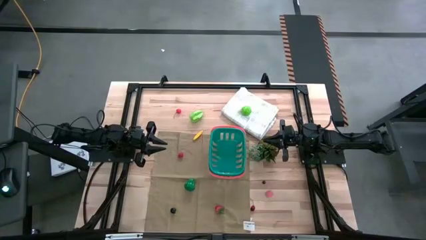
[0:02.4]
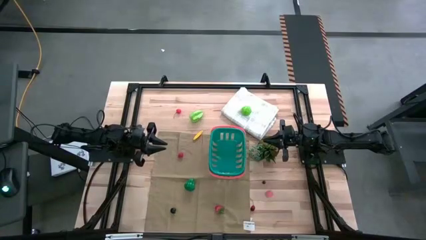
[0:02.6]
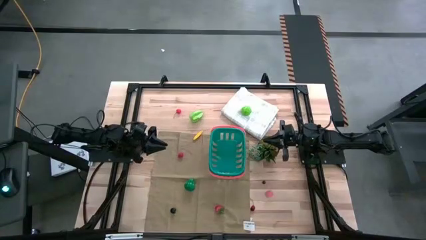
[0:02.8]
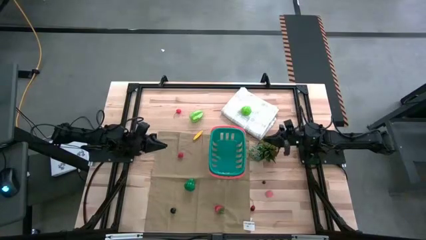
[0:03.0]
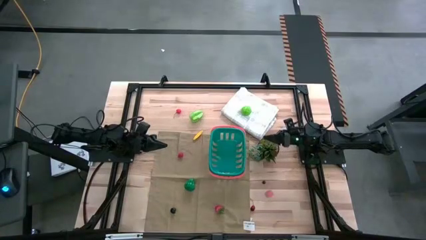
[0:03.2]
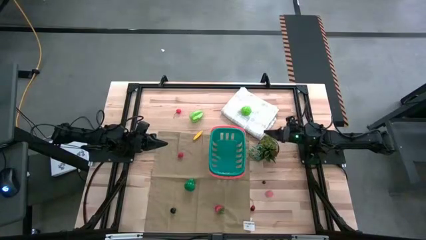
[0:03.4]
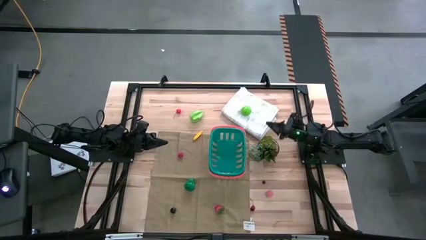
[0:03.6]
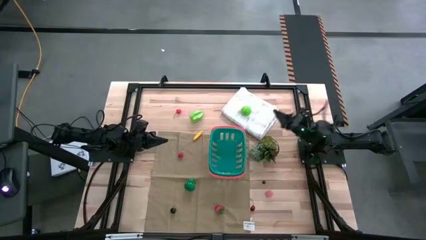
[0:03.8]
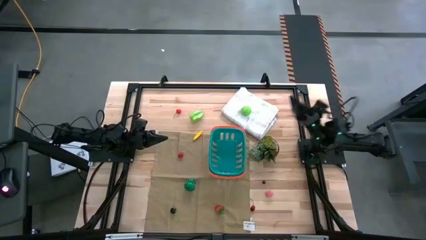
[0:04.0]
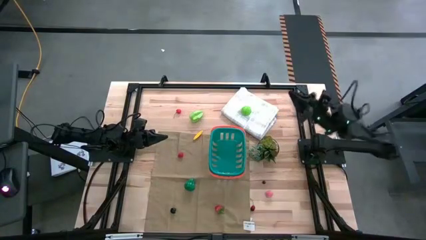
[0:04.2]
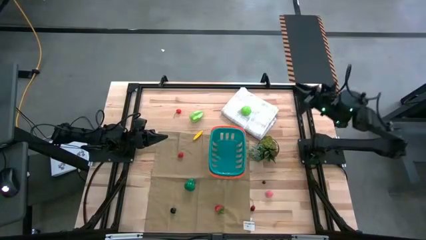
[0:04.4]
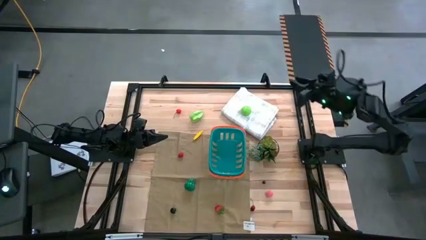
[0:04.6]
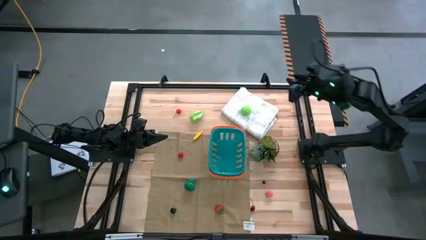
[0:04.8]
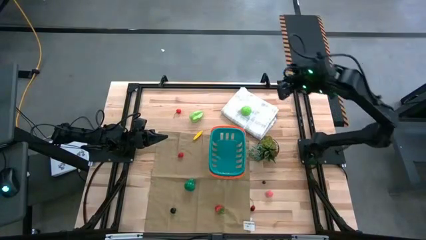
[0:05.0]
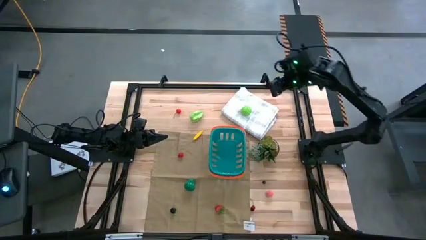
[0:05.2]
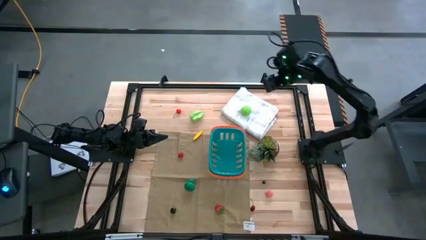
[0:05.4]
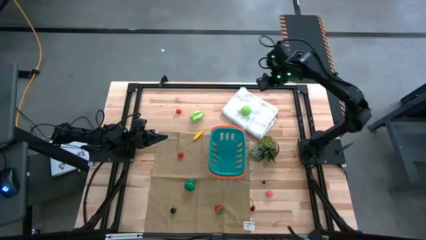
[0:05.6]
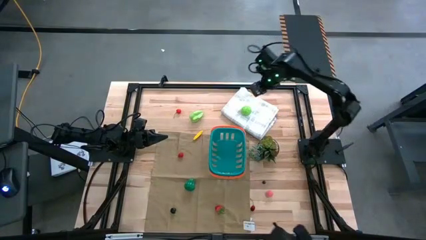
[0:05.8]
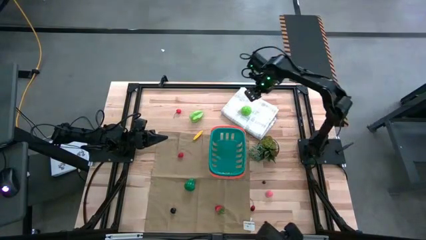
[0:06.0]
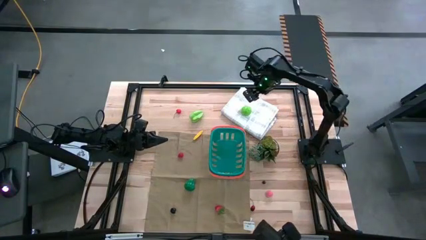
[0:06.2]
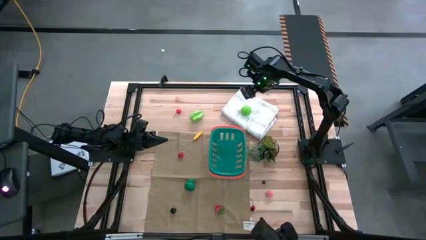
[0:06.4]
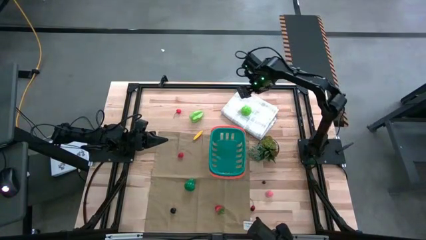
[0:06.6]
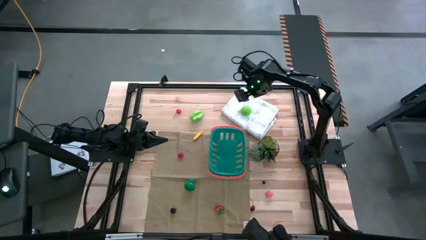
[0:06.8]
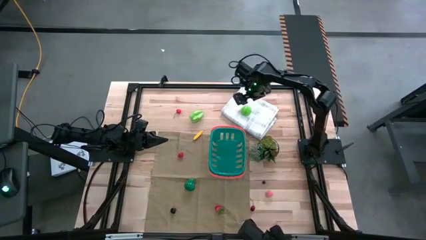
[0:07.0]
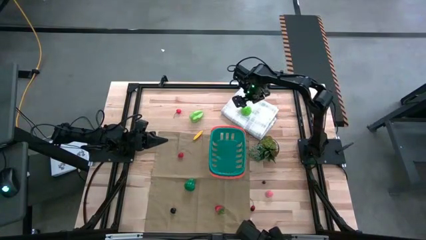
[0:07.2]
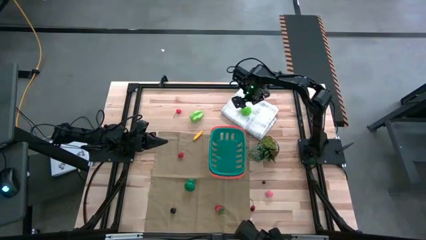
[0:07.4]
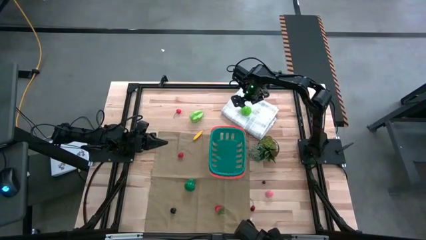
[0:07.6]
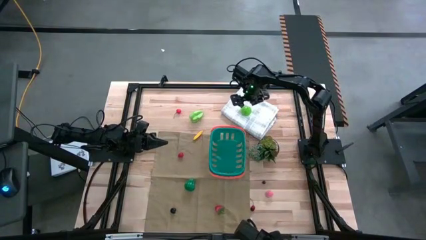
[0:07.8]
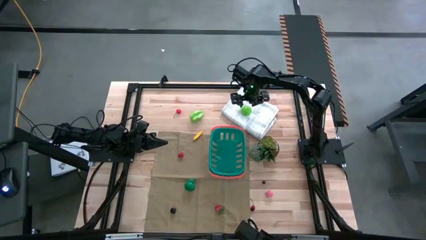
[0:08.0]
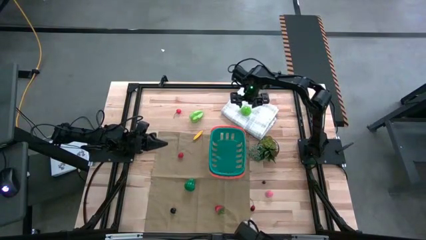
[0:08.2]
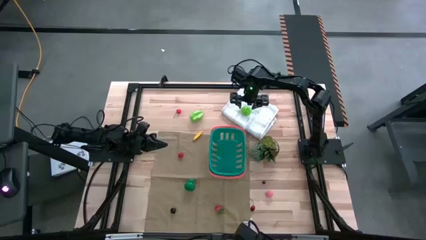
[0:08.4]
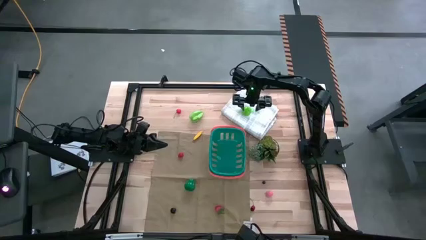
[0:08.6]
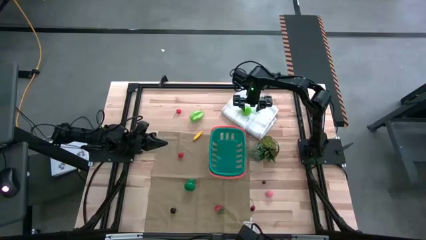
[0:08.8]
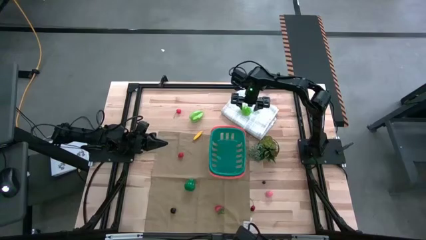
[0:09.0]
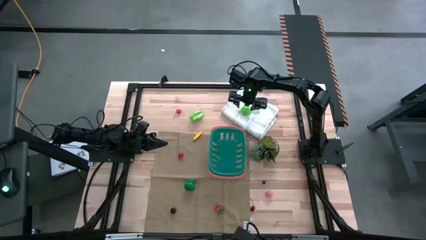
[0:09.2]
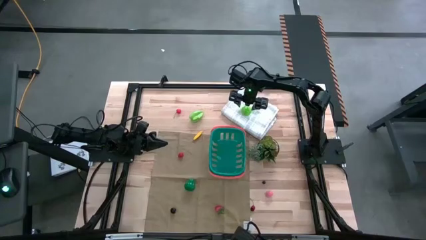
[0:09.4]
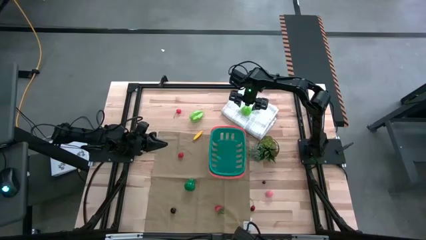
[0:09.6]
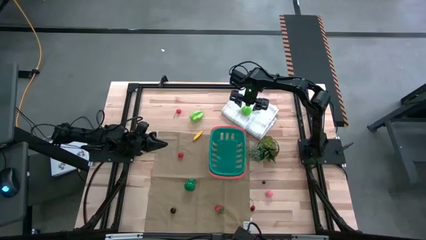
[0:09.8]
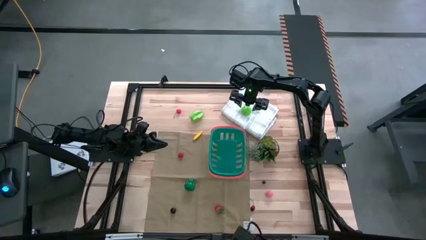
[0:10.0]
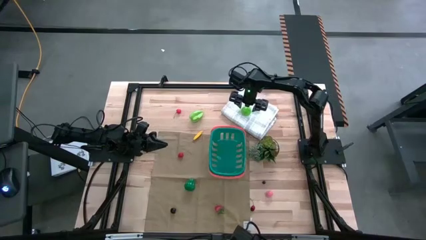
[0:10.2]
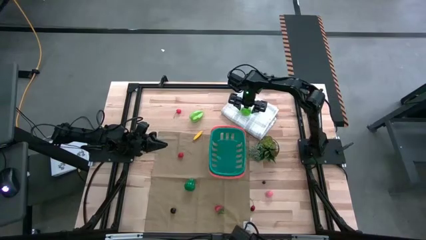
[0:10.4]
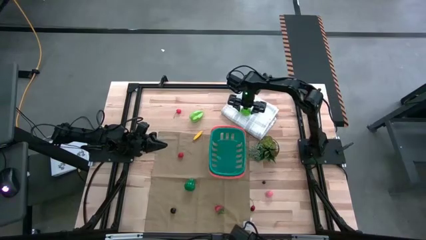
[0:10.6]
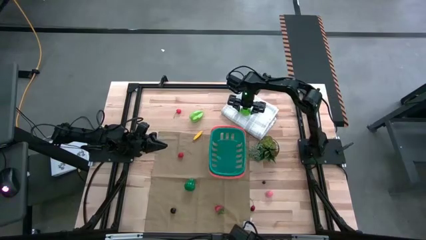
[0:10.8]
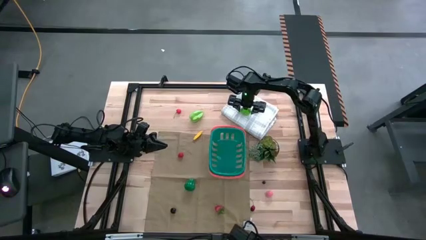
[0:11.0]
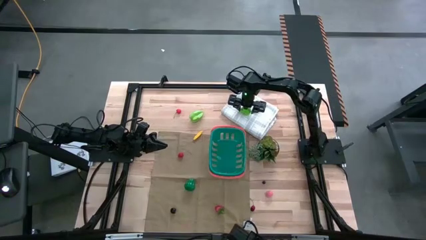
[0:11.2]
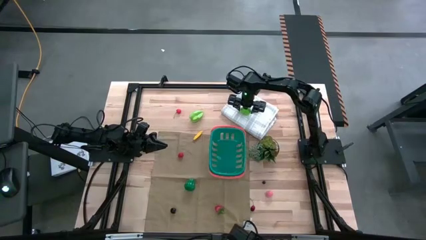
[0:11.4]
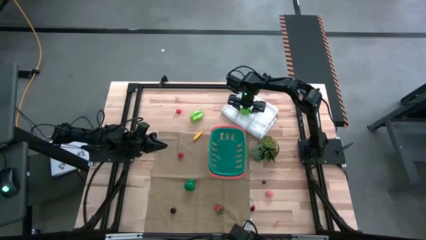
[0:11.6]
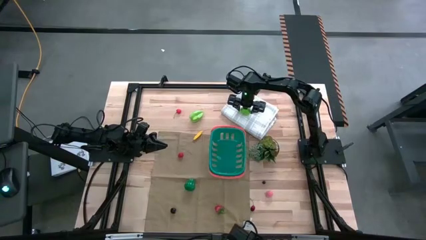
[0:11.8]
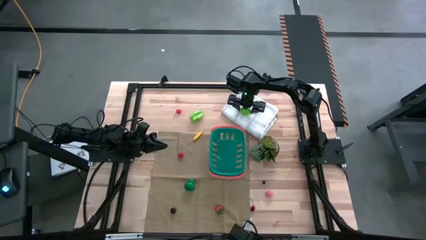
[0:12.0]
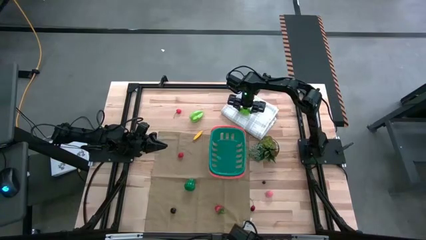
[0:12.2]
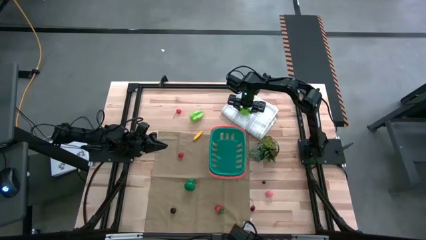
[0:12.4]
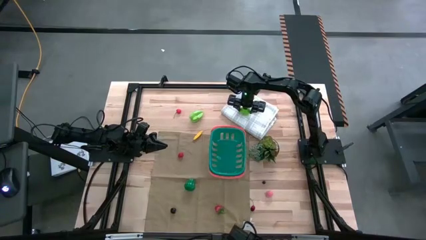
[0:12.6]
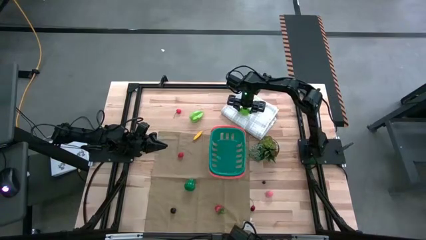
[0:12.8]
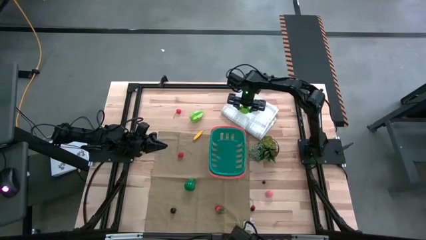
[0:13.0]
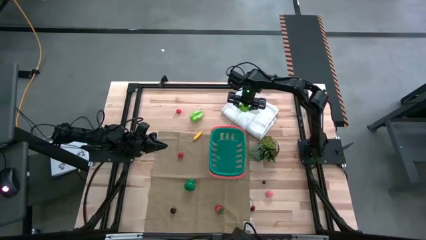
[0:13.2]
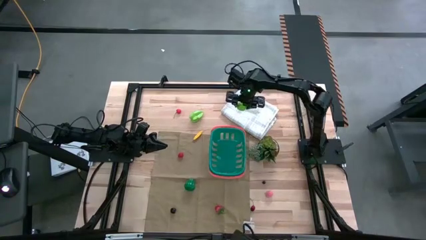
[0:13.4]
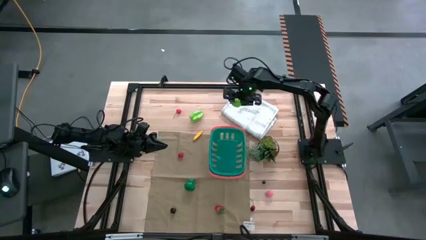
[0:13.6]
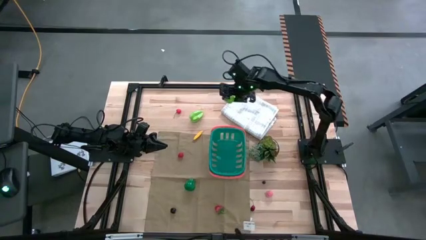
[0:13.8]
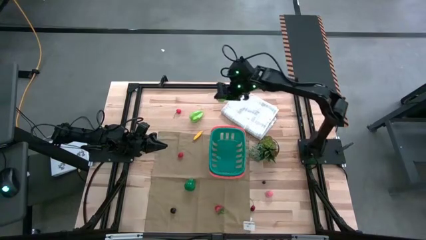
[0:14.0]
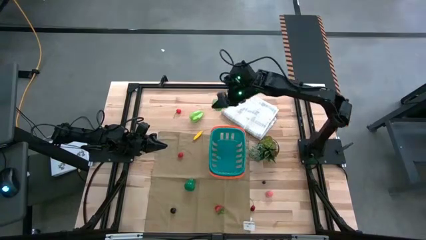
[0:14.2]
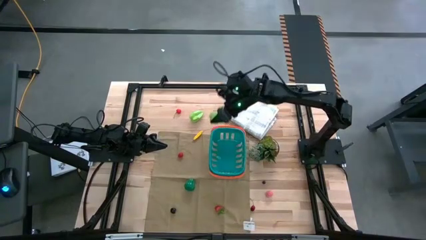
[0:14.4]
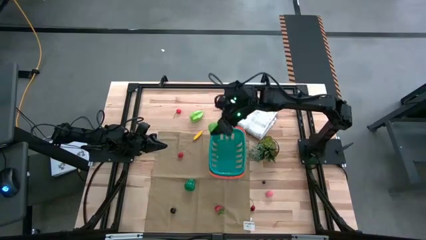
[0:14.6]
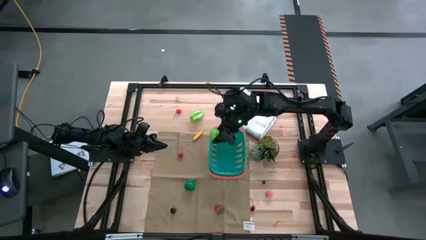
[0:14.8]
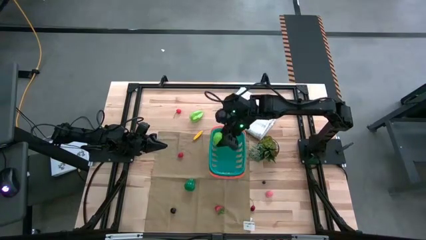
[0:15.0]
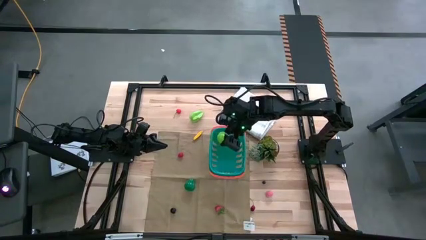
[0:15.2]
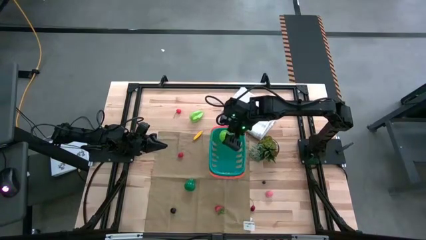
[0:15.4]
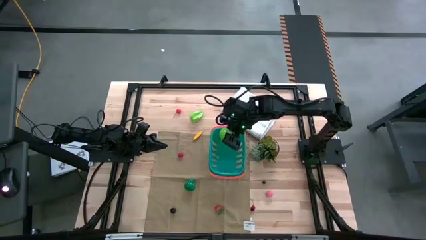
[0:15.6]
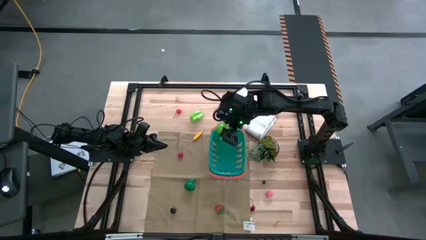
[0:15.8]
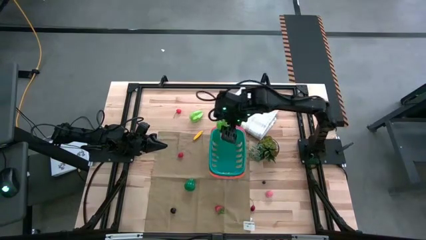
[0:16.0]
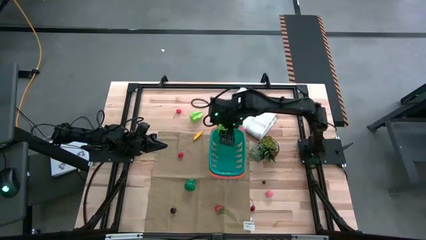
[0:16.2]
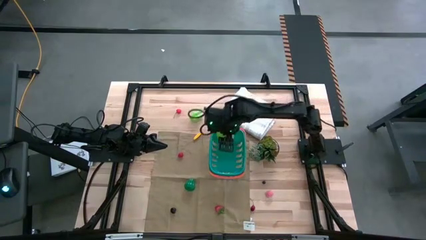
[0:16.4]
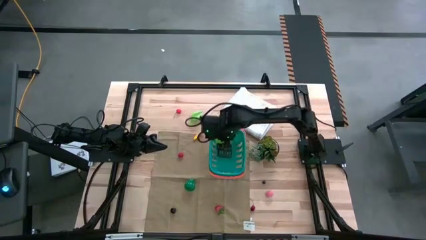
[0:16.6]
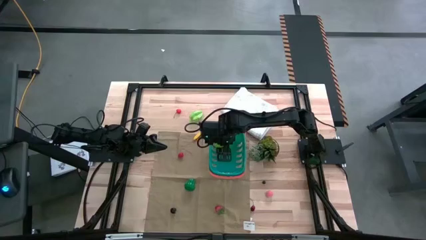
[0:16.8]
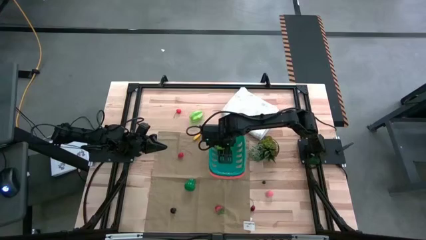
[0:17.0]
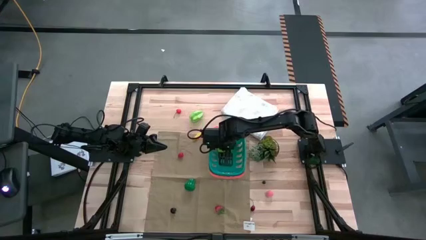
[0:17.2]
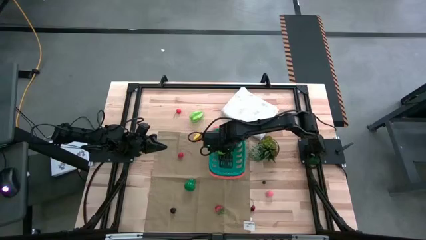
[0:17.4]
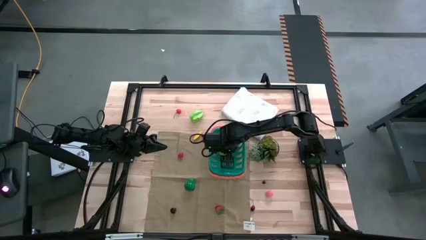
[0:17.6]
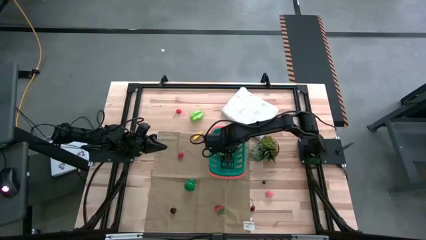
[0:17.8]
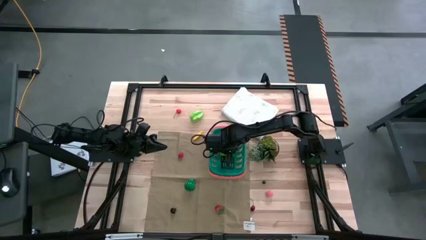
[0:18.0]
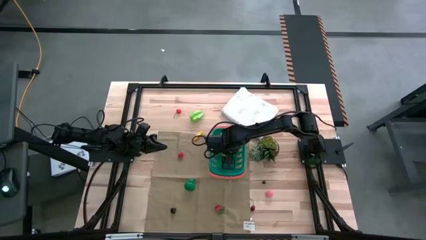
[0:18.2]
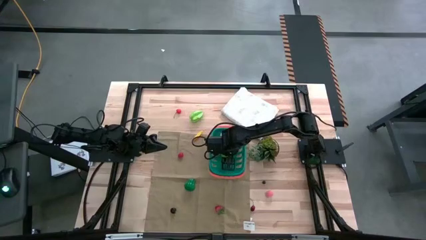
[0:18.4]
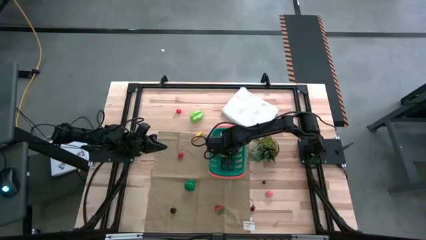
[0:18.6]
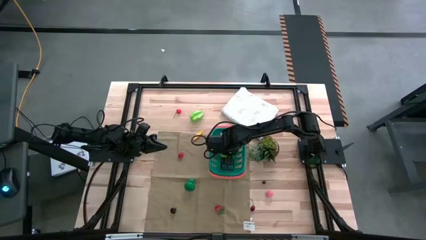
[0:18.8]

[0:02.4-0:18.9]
Task: Pick and placing Produce into tupperware
Put the green cabbage into the blue basket
